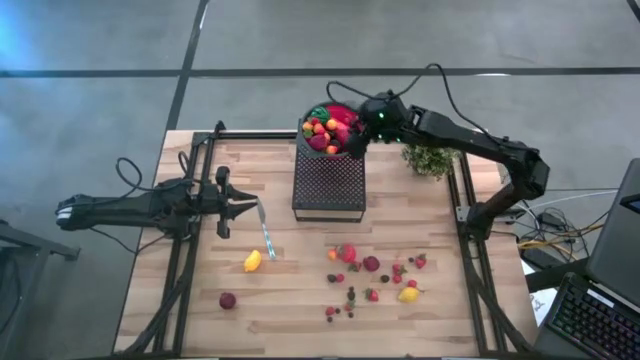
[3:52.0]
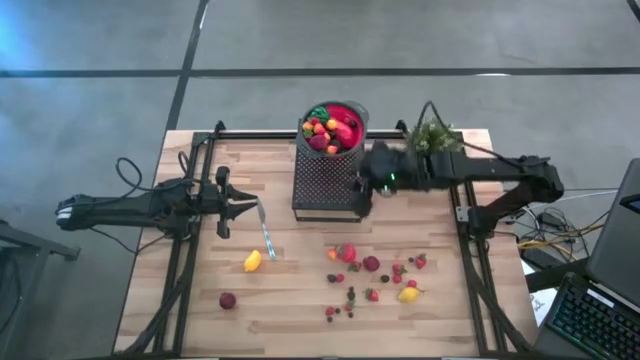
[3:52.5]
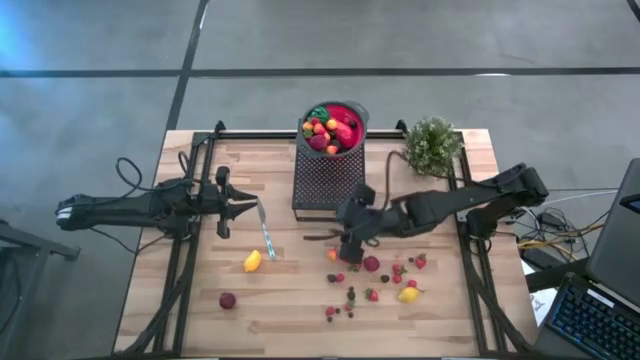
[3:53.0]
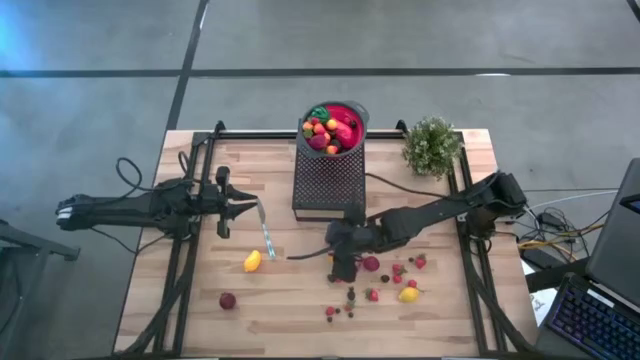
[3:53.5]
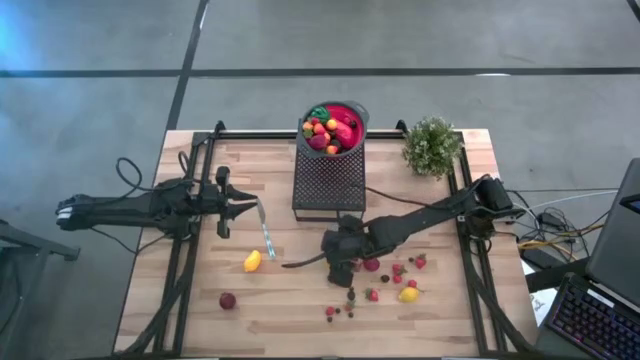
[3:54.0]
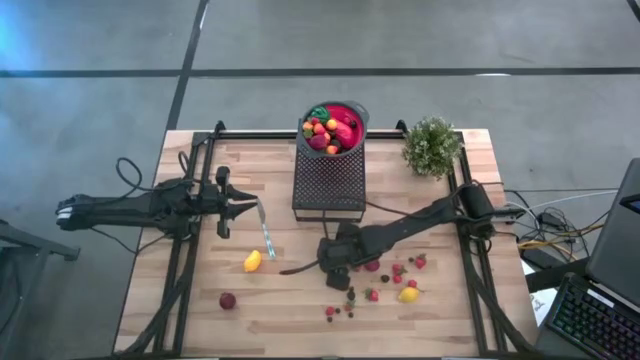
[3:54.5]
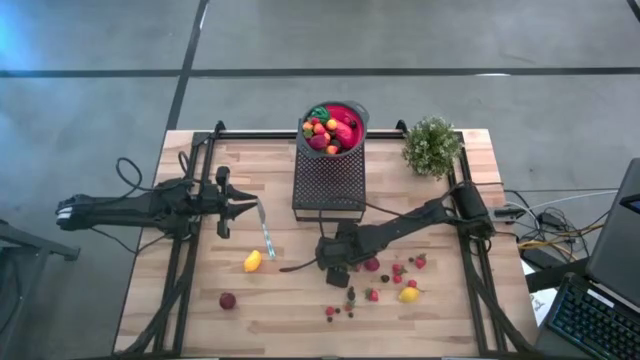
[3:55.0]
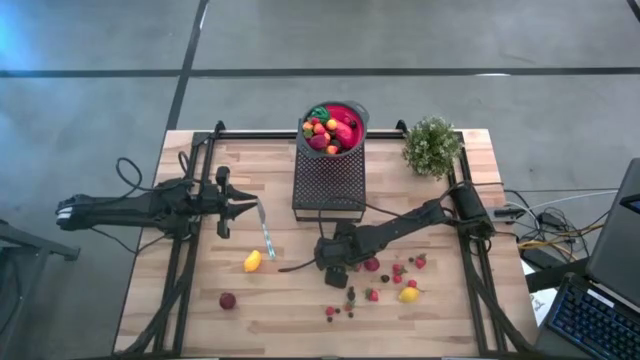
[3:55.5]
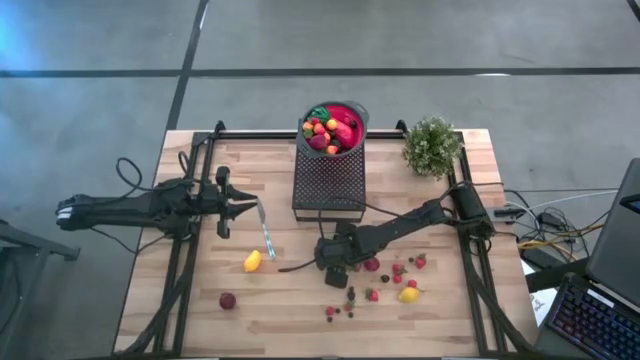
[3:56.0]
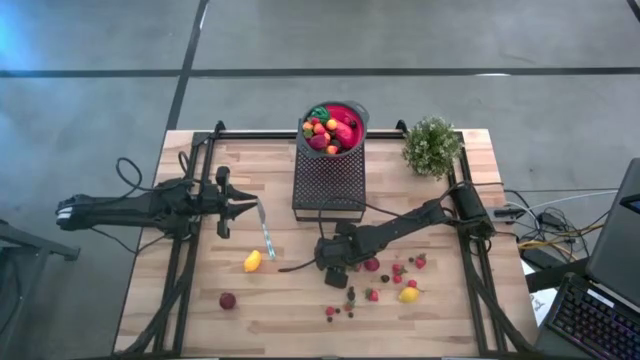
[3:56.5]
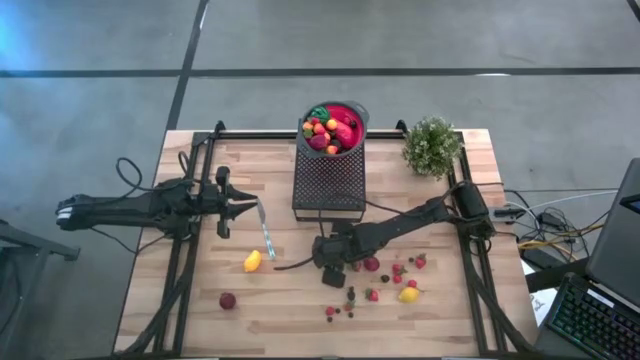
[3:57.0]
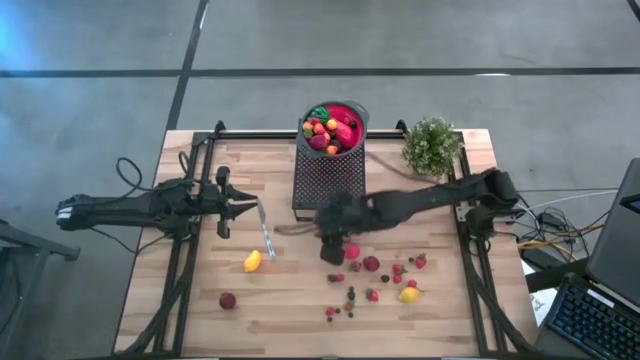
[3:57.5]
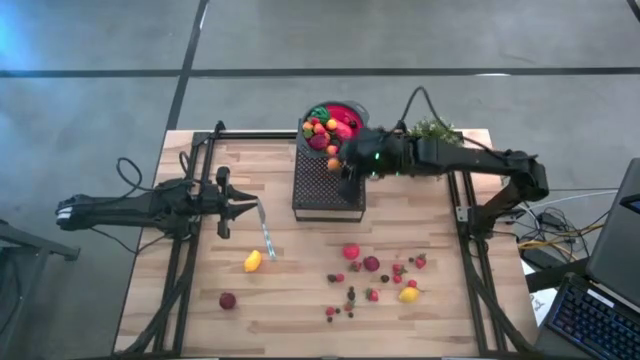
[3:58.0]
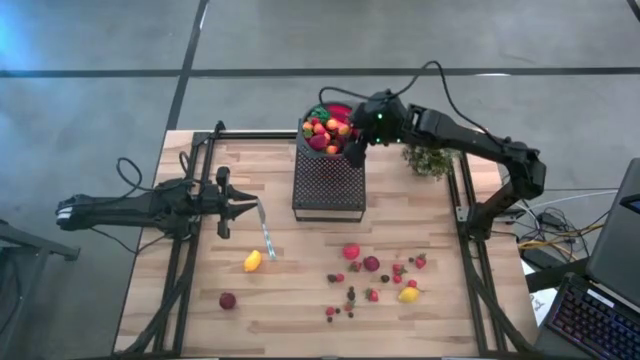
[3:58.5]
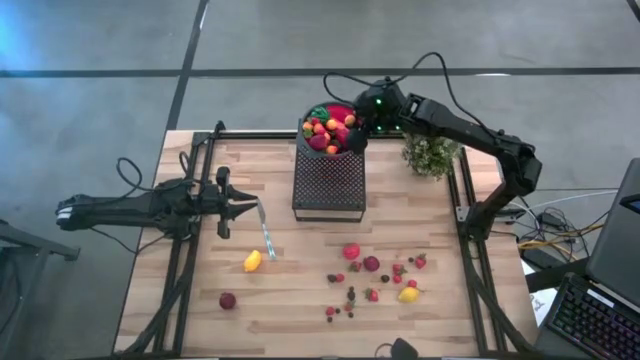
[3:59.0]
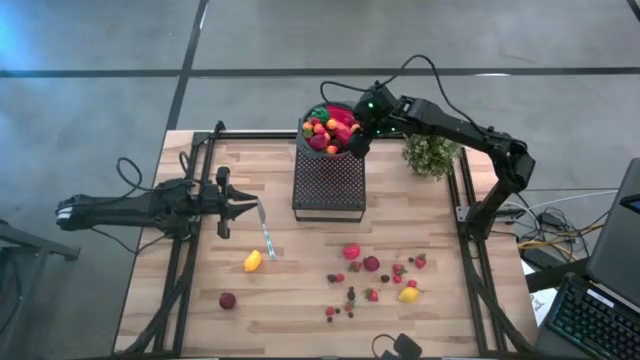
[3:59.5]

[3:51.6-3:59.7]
Task: Pick & Place Fruit
Put the pear into the strainer bowl on the shelf

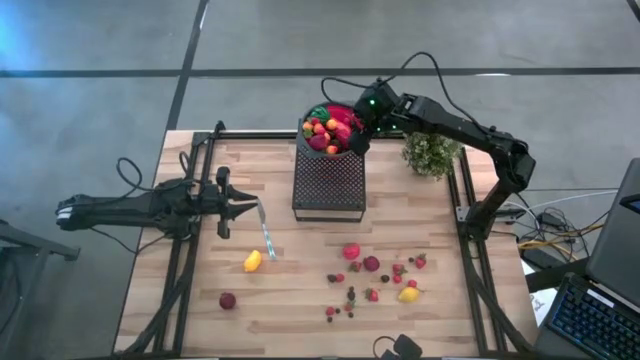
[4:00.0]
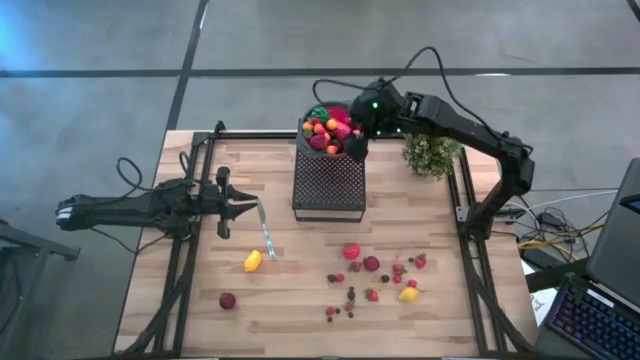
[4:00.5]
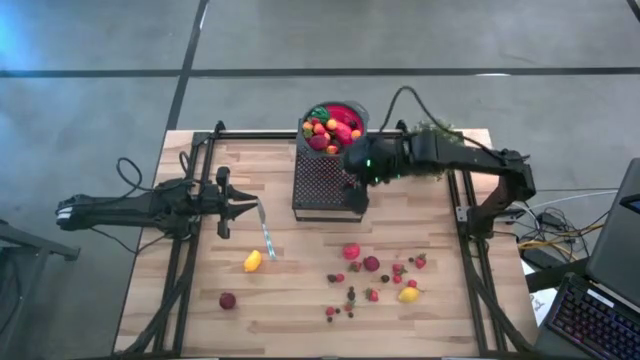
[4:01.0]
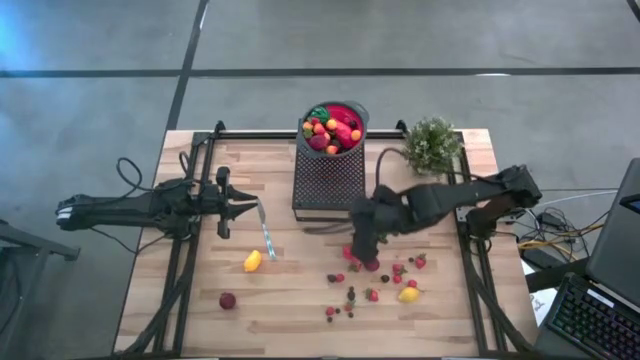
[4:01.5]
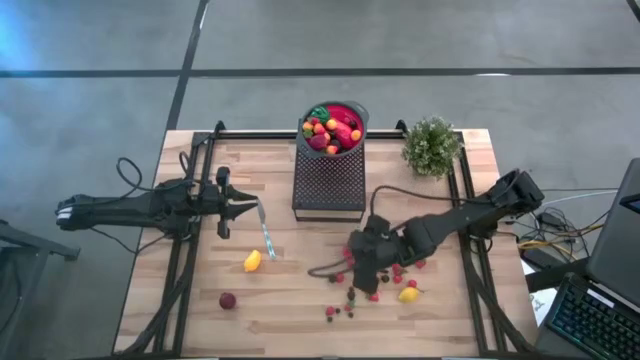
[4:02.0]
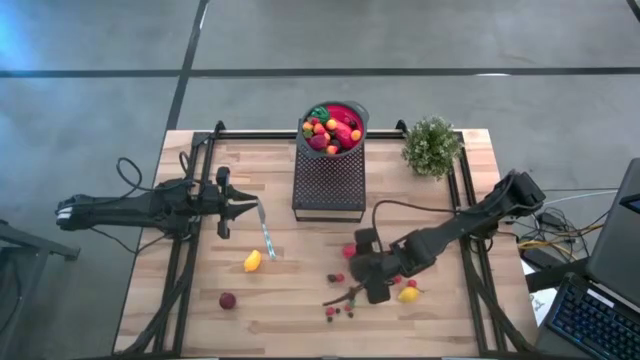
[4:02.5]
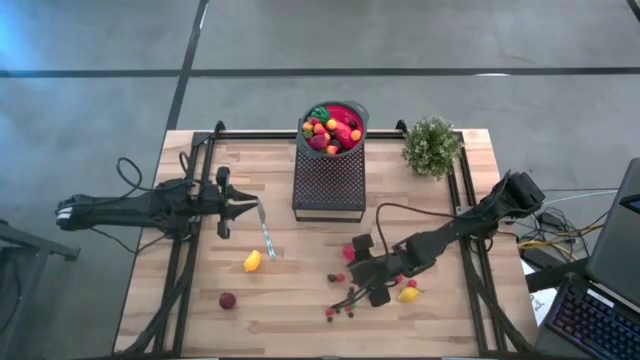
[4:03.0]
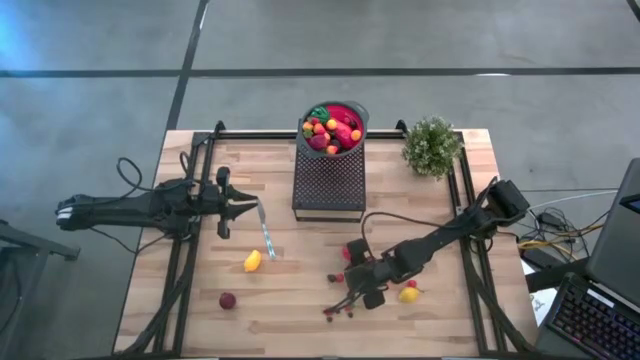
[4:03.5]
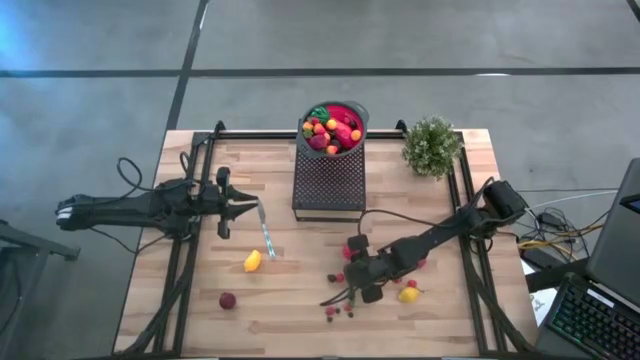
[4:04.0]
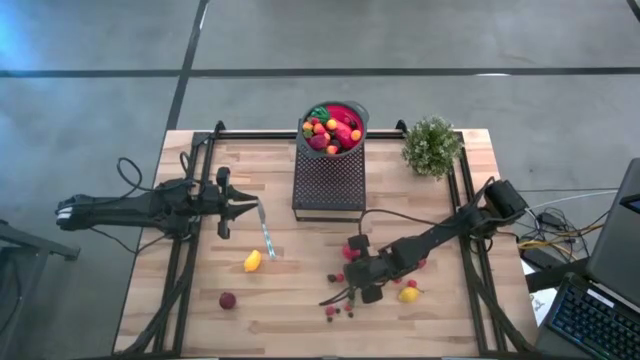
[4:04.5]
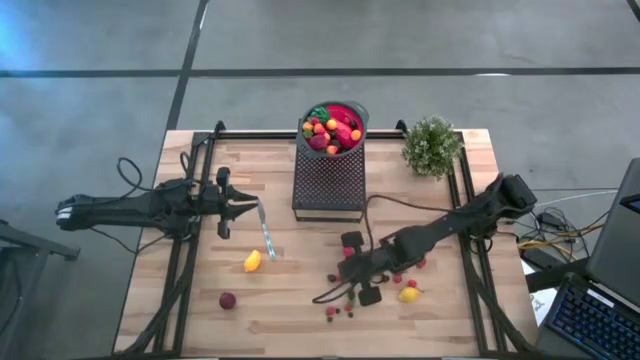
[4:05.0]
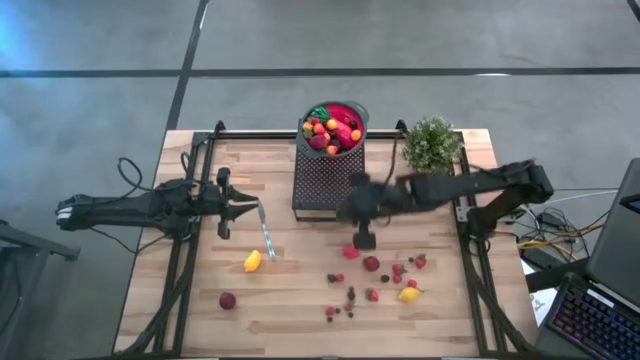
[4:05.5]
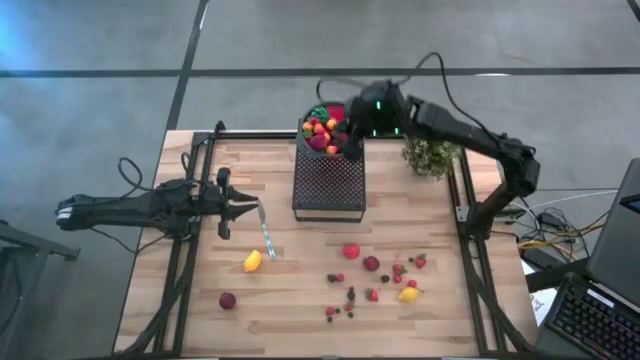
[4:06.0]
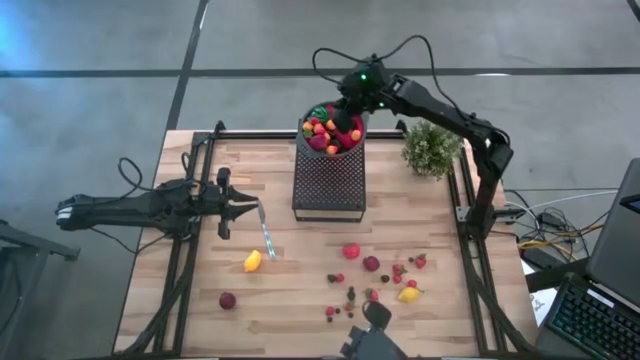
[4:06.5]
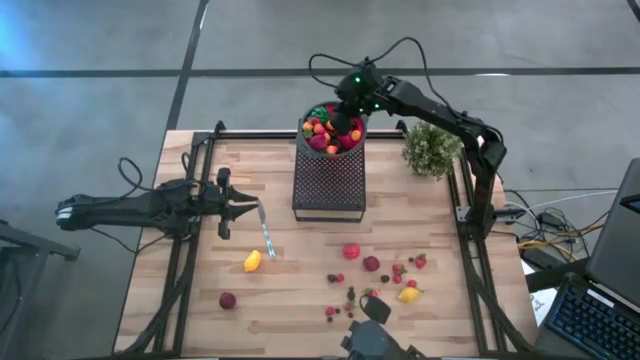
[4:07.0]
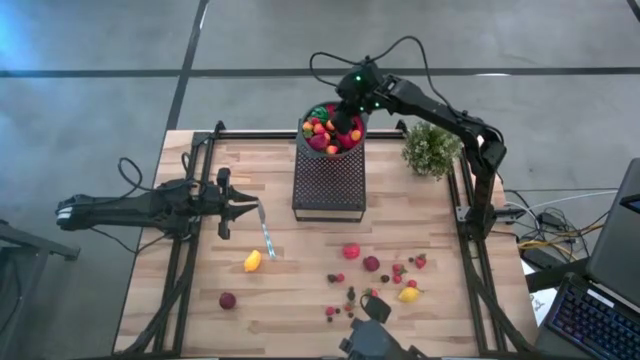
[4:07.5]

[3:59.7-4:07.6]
Put the strawberry into the strainer bowl on the shelf

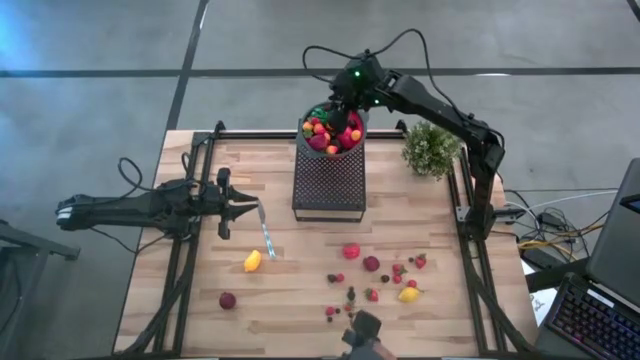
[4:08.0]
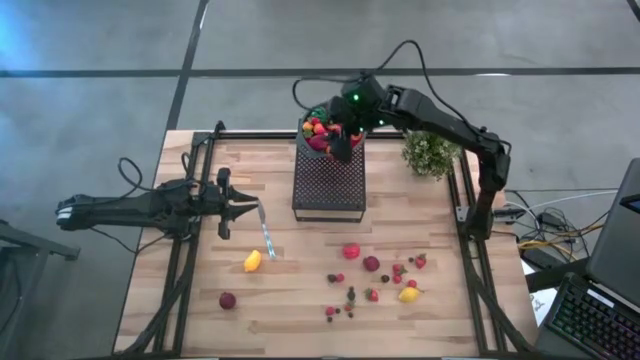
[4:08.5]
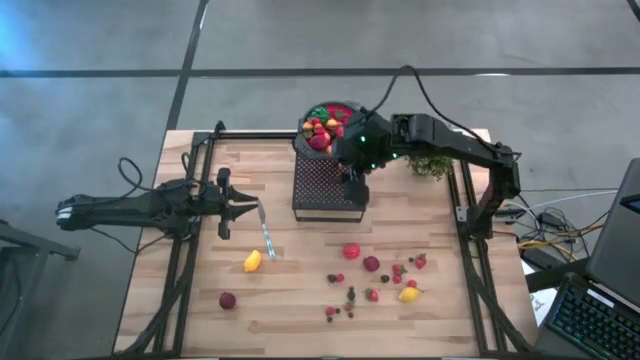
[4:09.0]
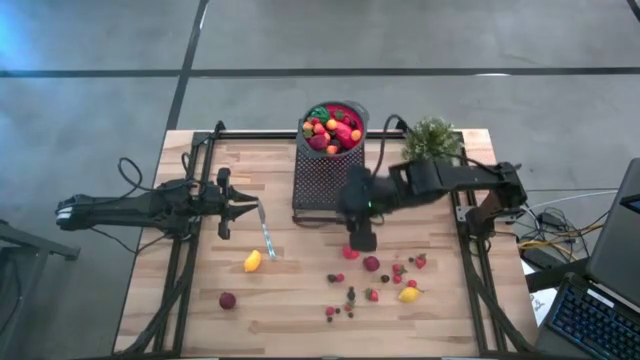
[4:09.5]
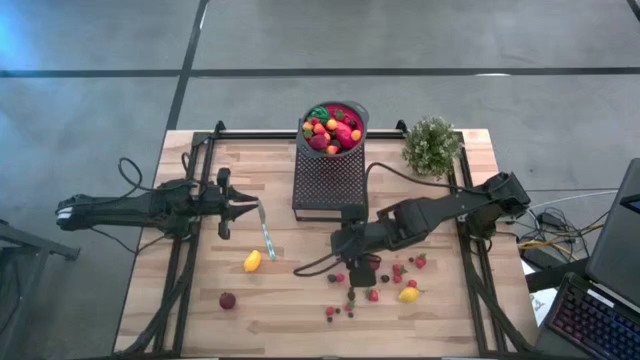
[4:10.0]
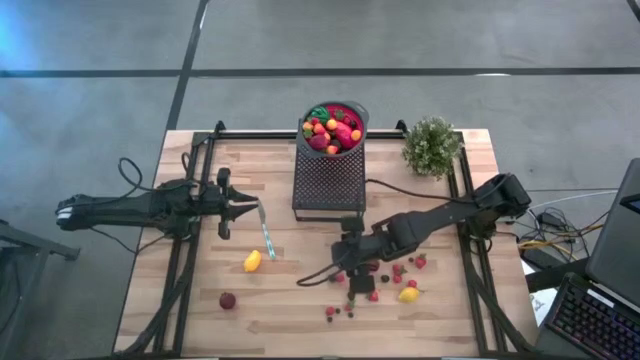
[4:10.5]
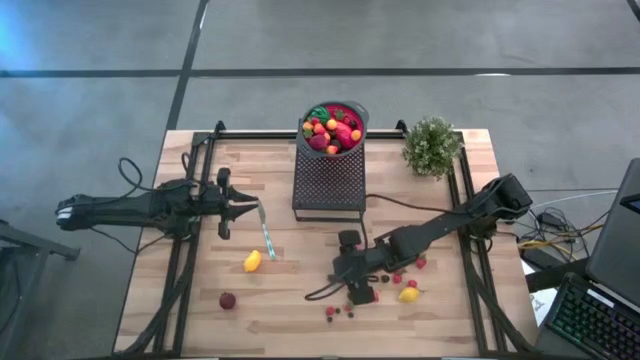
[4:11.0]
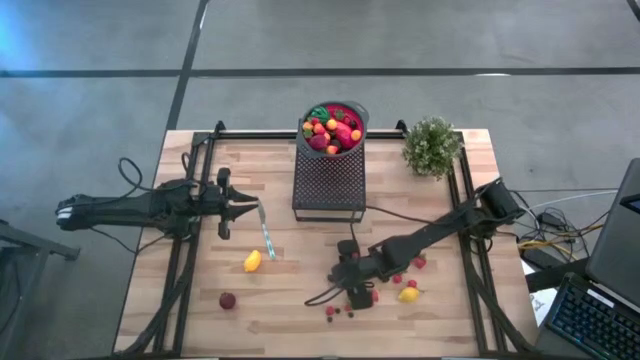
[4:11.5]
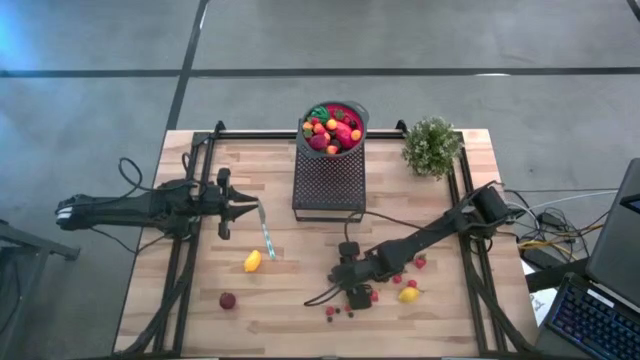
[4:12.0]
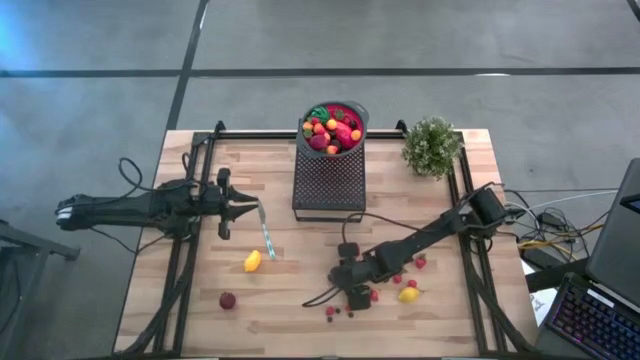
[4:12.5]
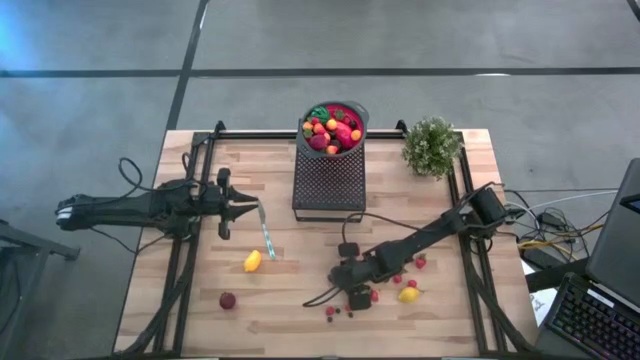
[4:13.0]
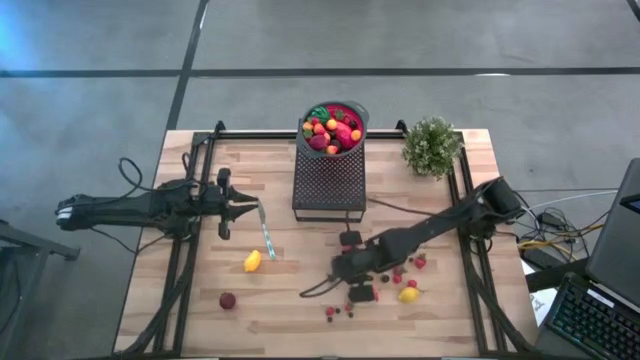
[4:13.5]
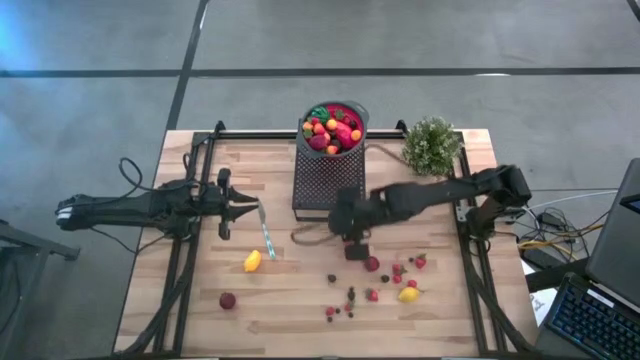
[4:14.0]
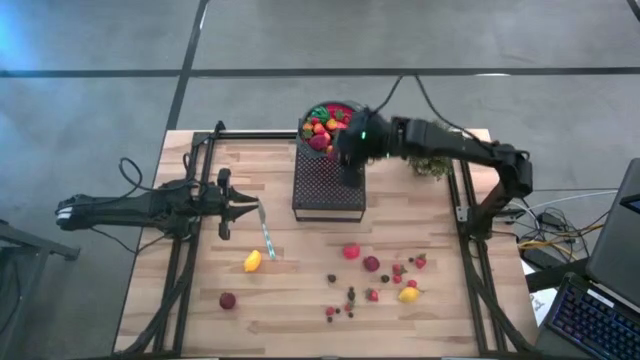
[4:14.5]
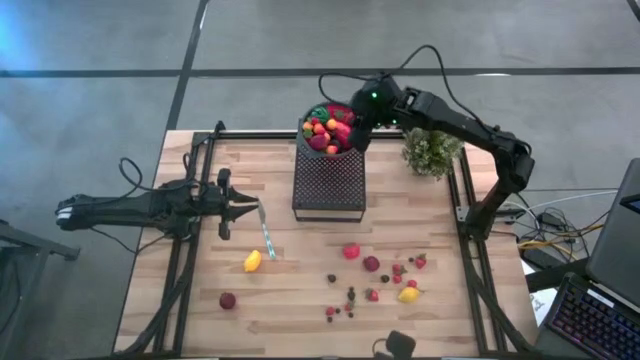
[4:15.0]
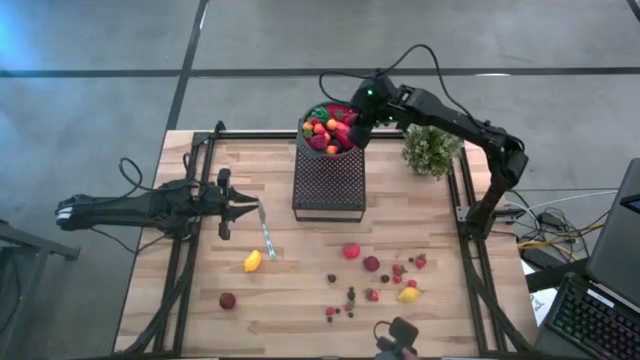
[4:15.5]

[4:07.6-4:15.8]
Put the top raspberry into the strainer bowl on the shelf
